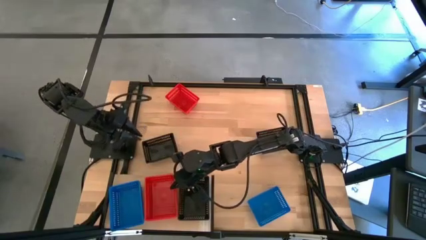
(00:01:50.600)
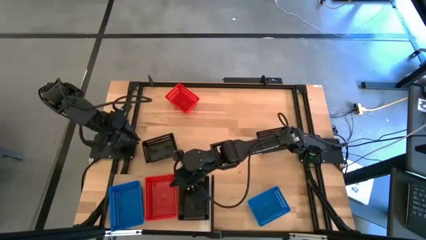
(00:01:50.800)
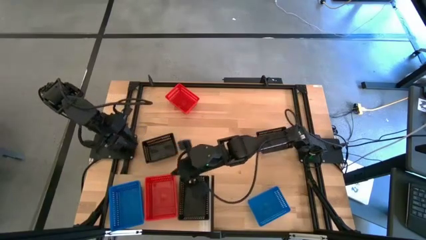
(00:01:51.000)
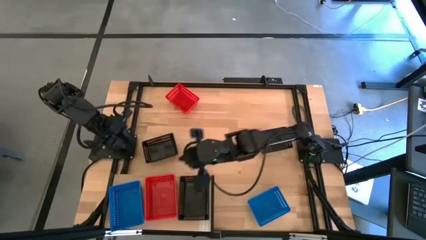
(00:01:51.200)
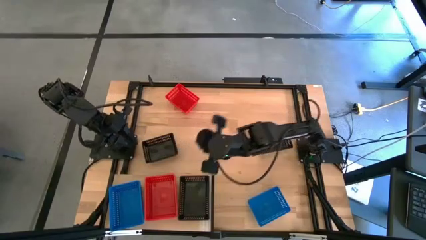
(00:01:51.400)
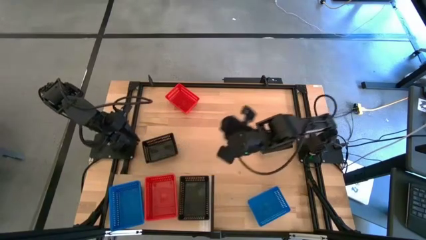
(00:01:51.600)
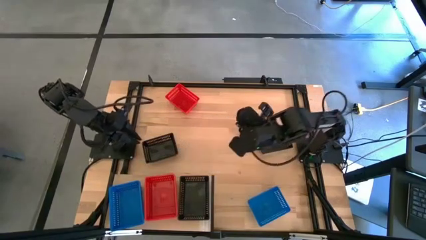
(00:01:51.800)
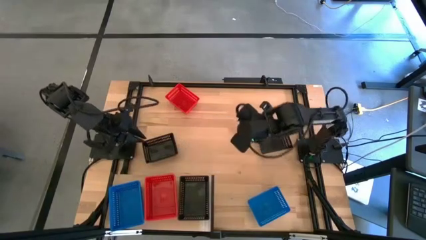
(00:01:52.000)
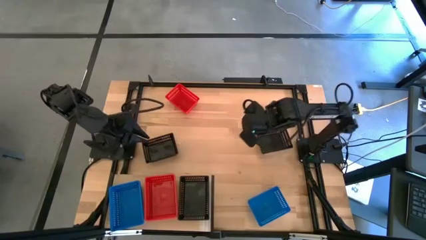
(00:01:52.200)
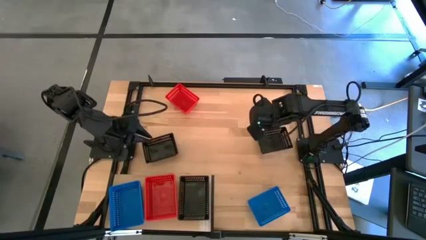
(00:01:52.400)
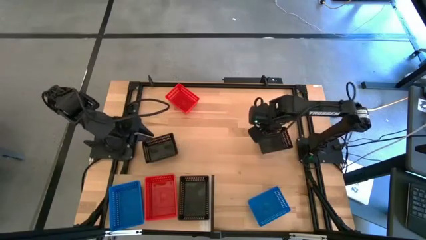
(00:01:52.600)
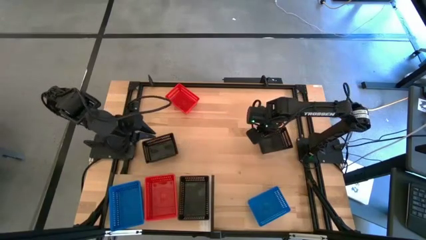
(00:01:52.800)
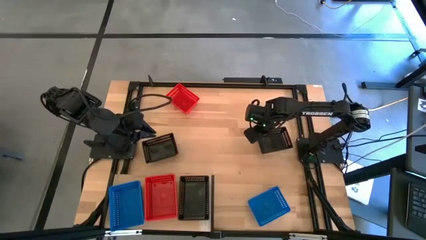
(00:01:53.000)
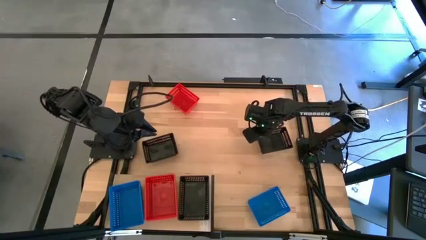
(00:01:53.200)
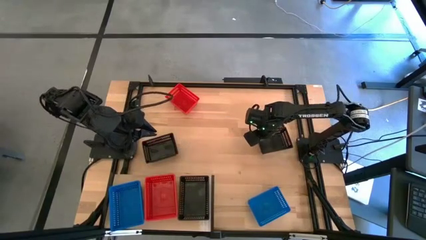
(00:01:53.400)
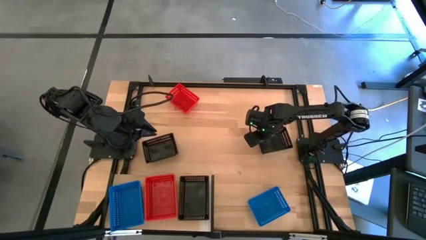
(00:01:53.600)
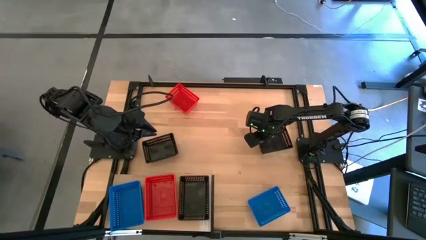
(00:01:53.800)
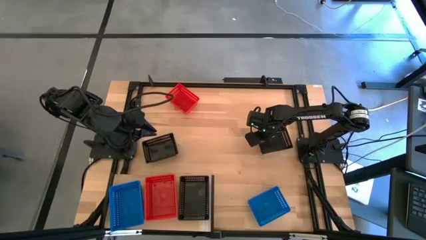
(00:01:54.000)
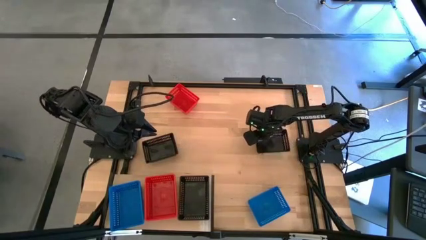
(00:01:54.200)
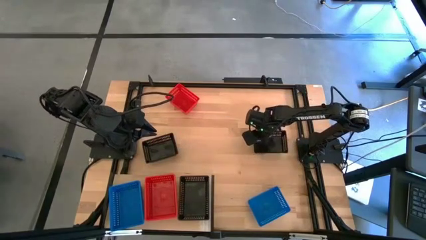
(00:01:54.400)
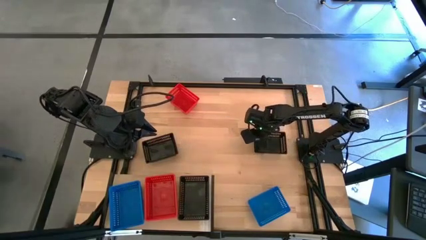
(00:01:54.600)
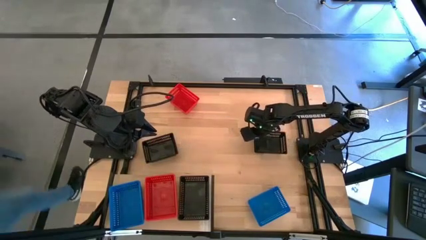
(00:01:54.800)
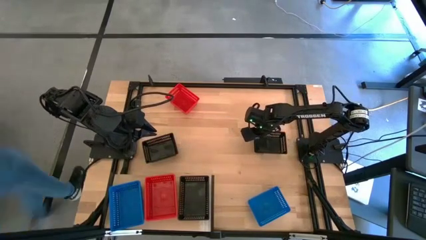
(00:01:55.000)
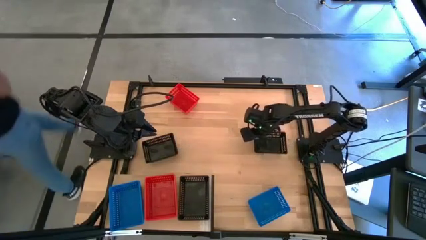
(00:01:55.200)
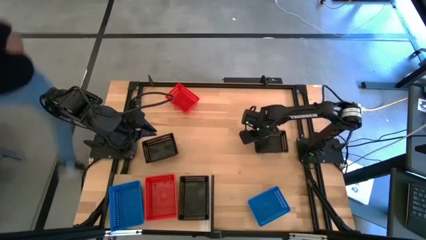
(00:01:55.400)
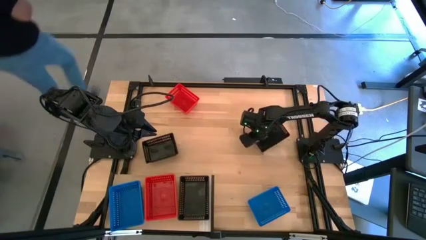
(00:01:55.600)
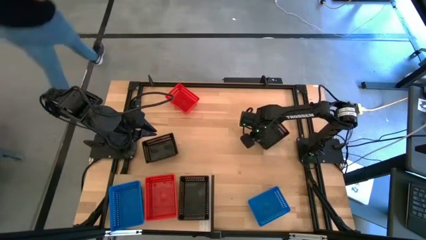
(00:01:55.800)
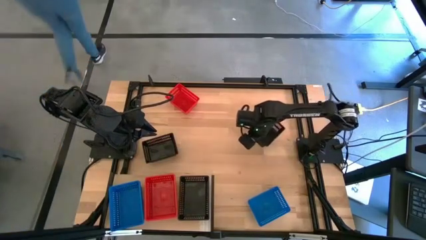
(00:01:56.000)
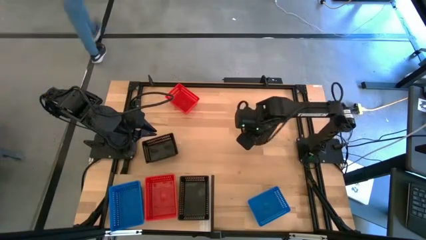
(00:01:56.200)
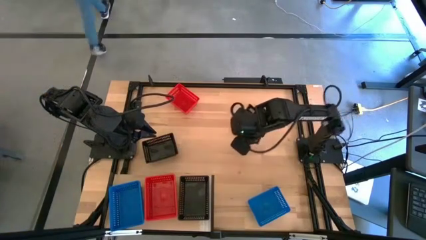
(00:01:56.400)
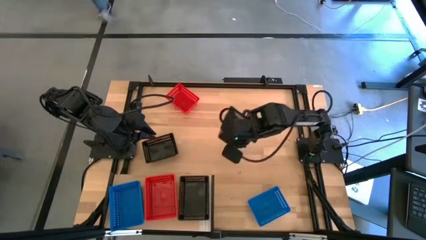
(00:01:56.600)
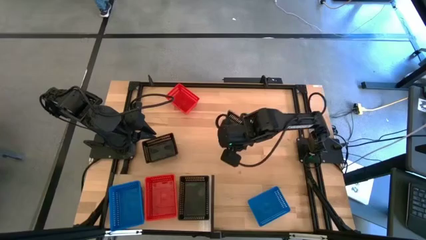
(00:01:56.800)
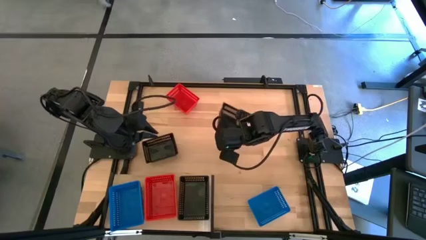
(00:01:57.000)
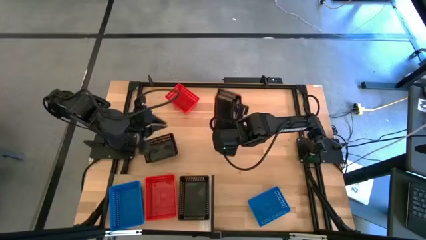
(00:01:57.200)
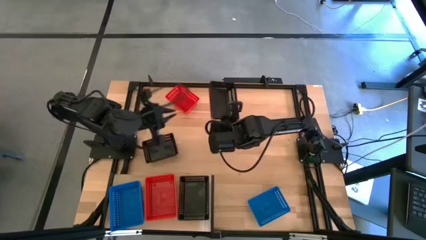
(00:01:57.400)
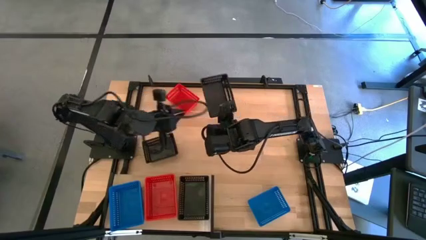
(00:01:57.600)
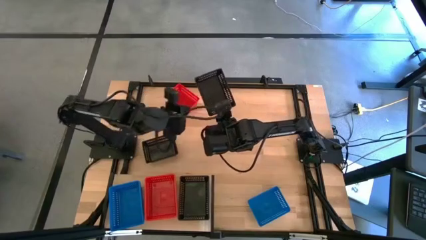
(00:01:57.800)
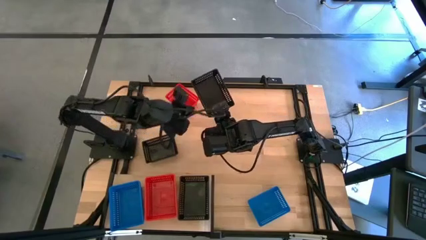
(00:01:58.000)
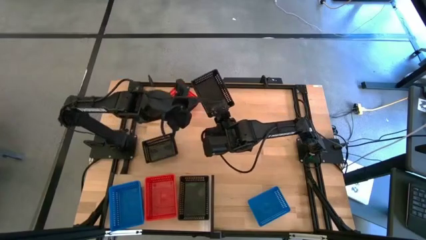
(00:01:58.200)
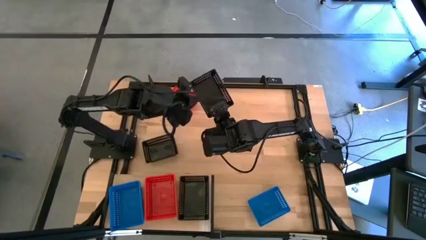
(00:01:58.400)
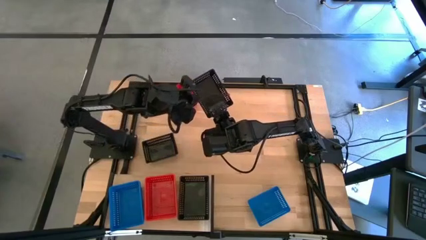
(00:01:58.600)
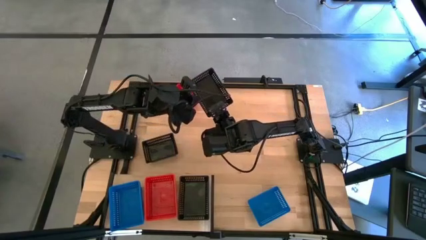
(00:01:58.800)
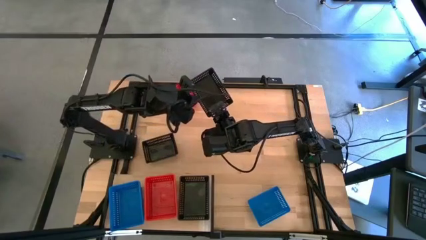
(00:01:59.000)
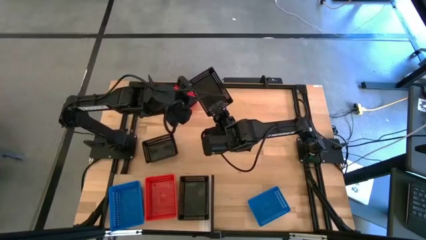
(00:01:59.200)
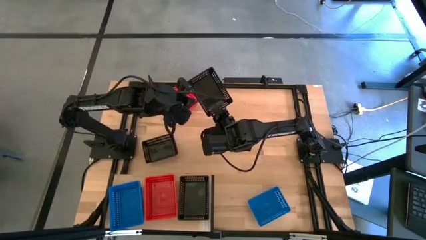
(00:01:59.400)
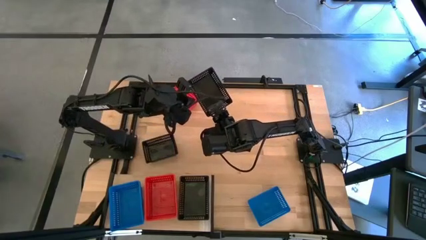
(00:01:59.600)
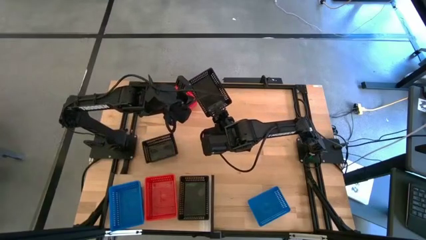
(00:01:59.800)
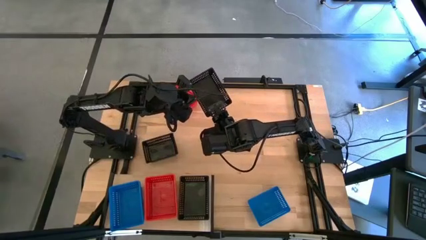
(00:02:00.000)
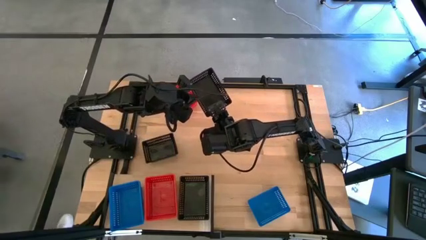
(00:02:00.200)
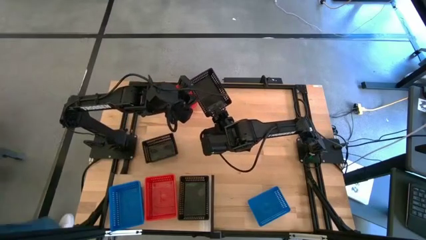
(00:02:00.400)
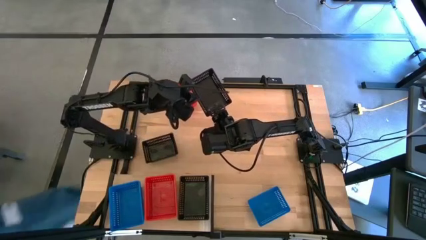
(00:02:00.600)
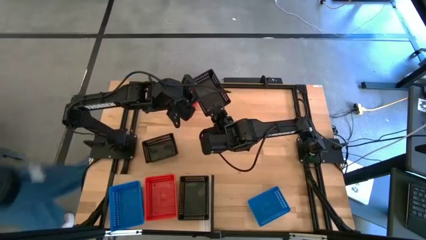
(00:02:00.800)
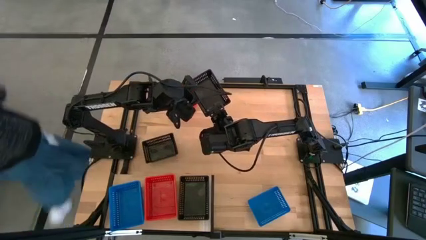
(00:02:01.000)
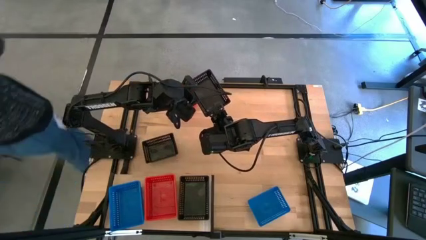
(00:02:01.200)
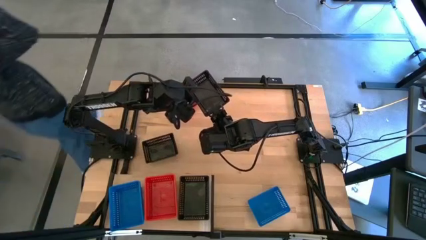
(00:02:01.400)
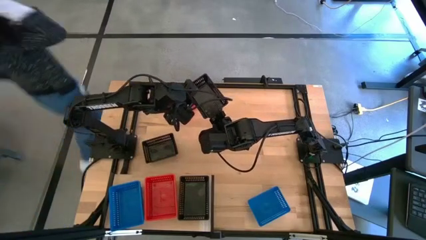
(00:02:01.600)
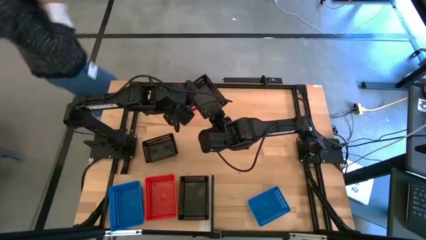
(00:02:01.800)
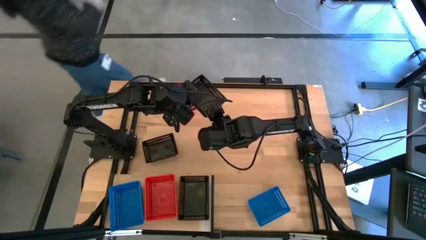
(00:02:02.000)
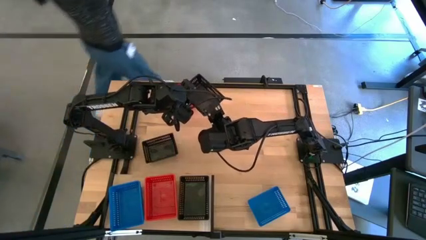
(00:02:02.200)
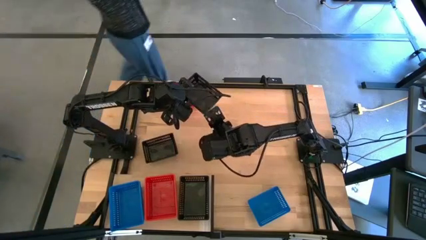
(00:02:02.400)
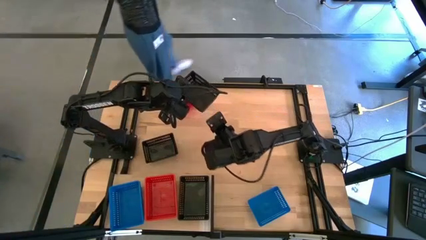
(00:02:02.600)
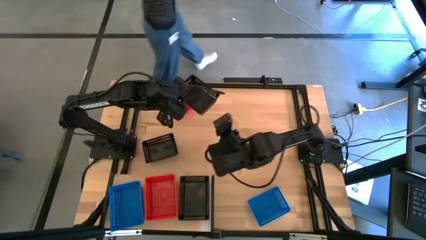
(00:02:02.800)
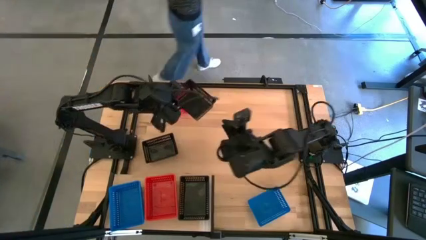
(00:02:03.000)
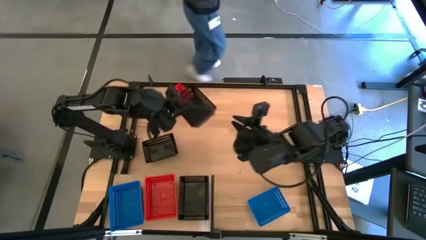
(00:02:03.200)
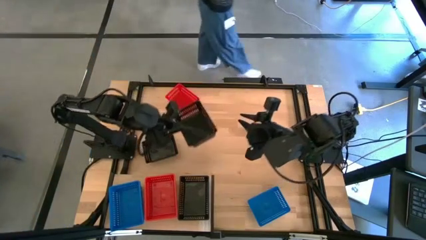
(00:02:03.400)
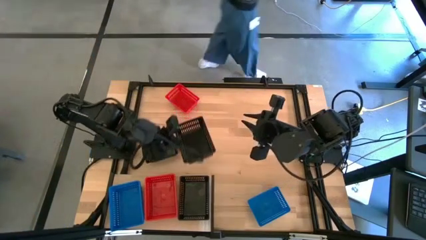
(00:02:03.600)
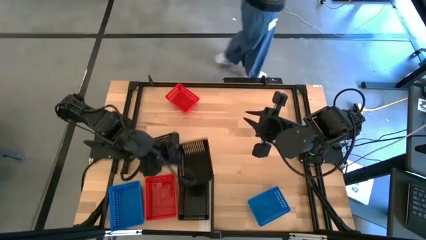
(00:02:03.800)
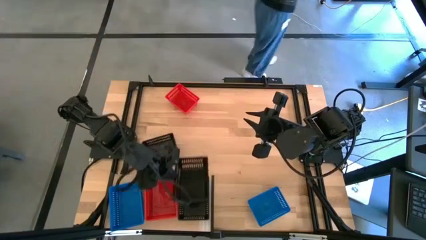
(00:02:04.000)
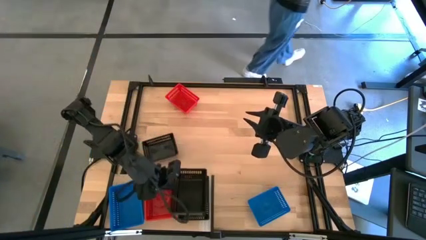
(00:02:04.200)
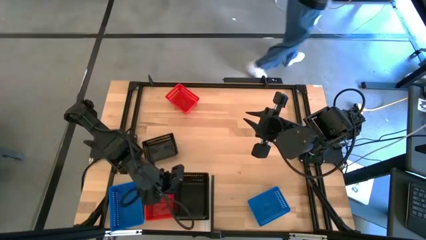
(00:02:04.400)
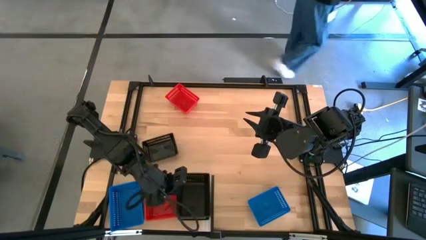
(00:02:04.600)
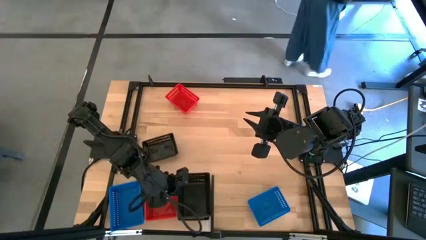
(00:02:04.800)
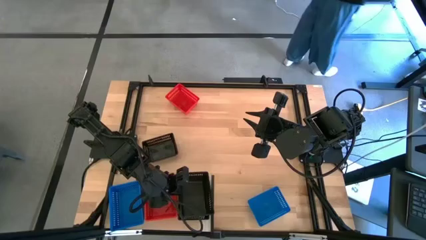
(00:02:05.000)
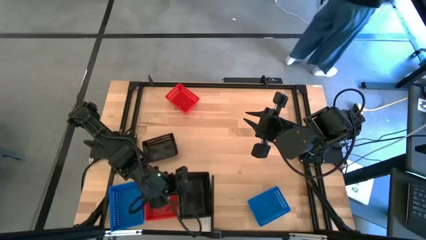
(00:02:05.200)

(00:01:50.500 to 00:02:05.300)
Task: Stack baskets on shelf by color
Stack the right black bin on top of the other black bin on the shelf

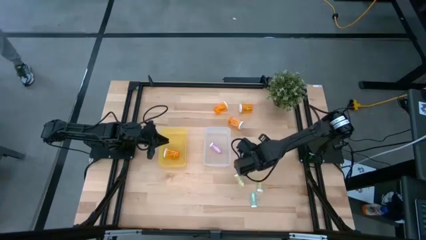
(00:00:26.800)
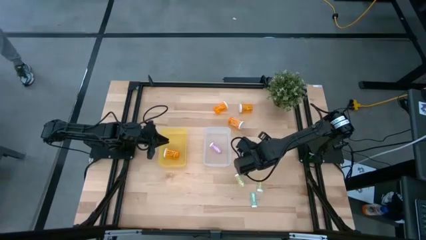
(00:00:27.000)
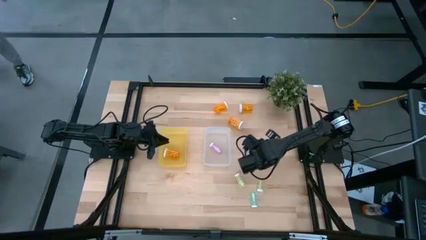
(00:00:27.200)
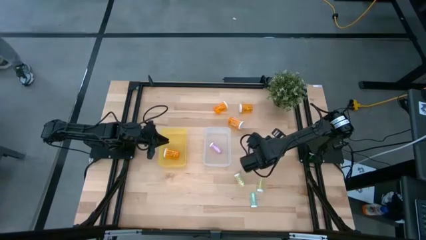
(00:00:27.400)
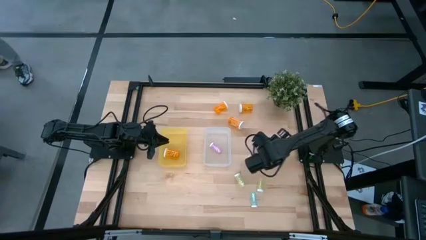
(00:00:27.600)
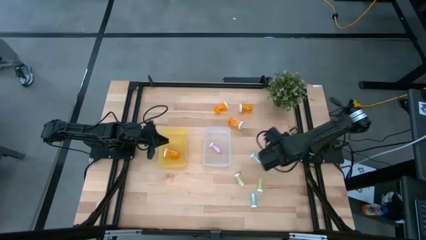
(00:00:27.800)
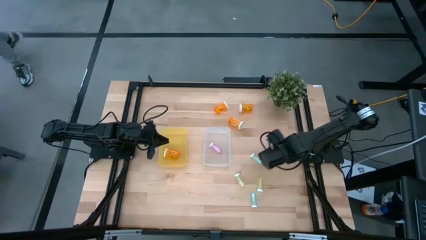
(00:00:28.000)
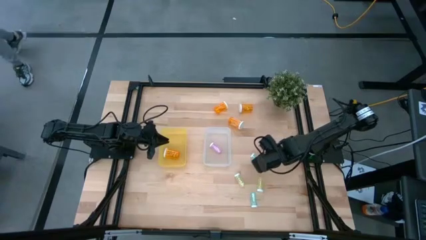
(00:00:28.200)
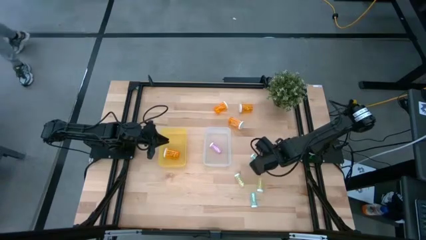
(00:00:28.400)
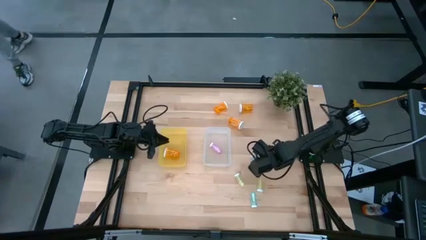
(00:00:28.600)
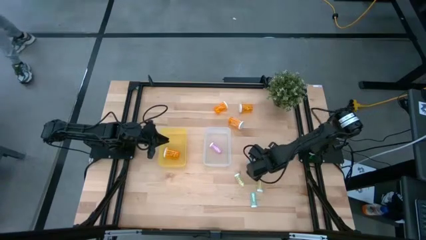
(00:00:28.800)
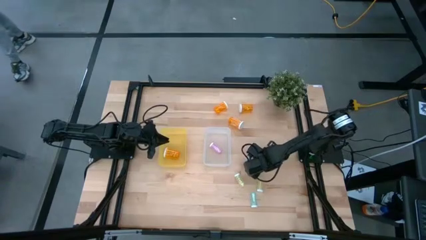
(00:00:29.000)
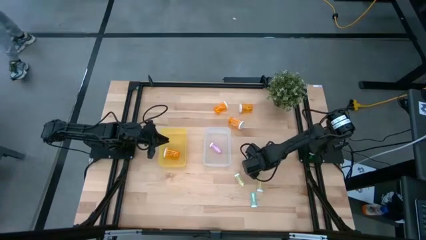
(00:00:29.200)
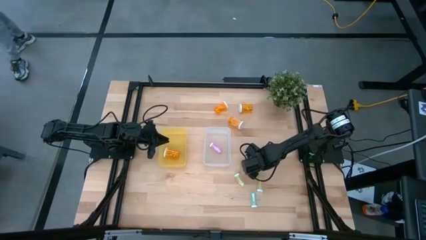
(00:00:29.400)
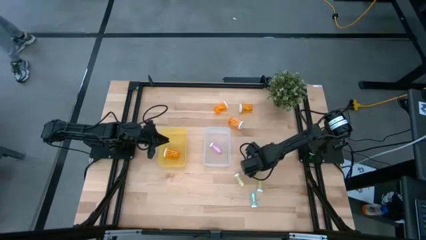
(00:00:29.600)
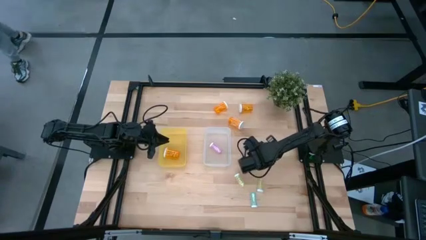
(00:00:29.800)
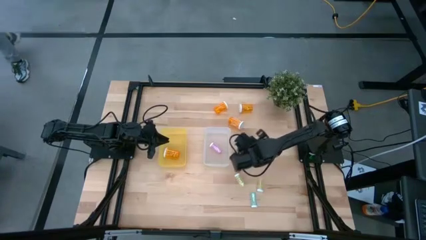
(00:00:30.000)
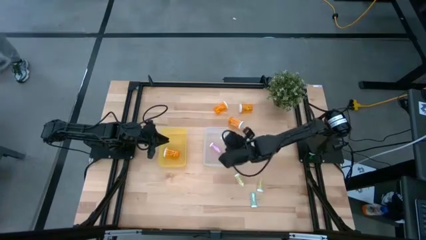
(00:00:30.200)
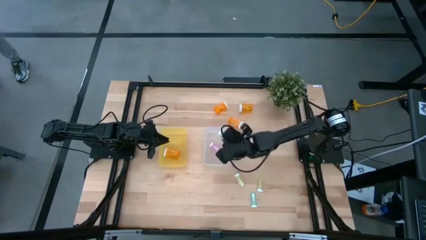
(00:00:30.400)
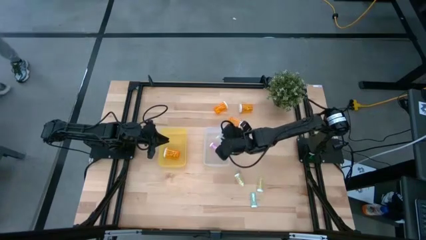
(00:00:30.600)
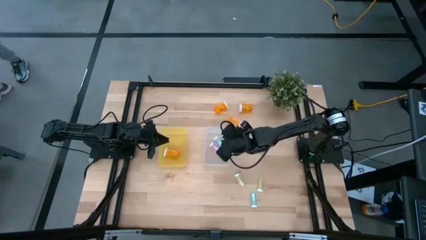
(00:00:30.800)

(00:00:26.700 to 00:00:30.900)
Task: Pick and place medicine bottles into bin by pill shape (circle, oval)
Put the green pill bottle into the transparent bin
